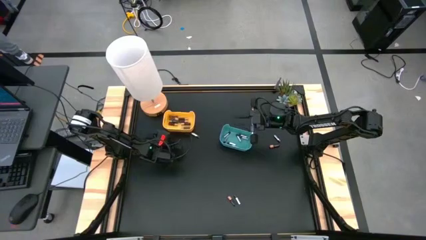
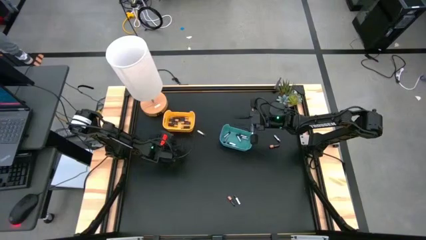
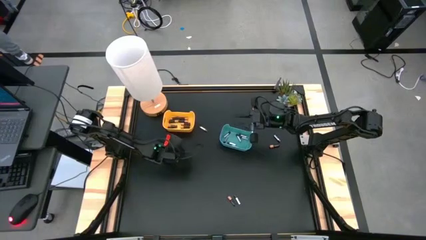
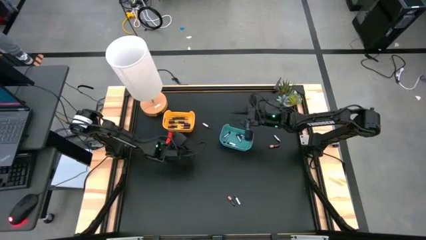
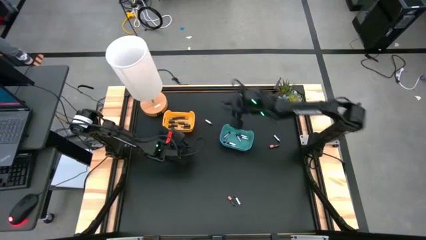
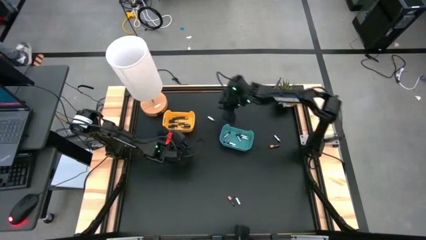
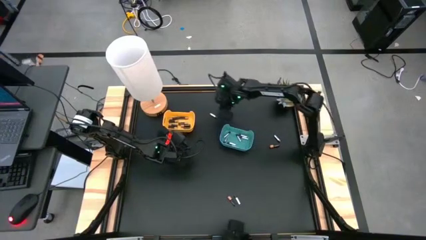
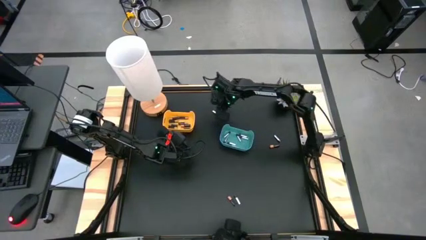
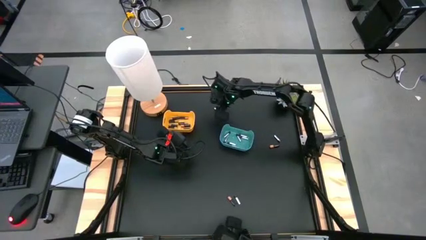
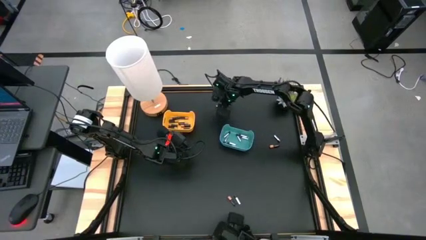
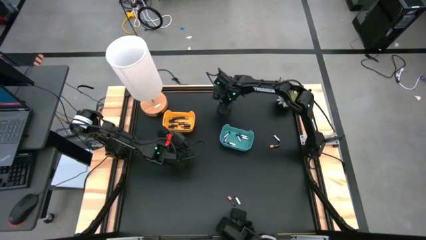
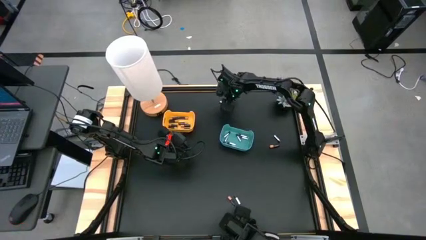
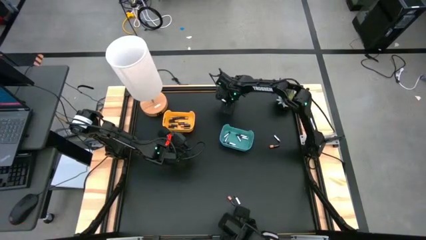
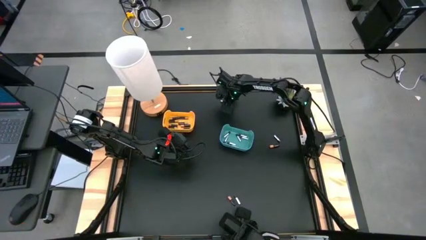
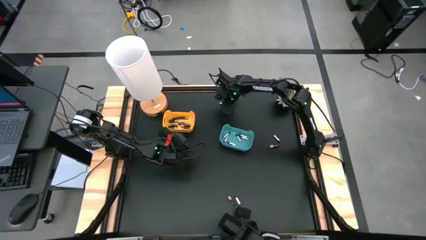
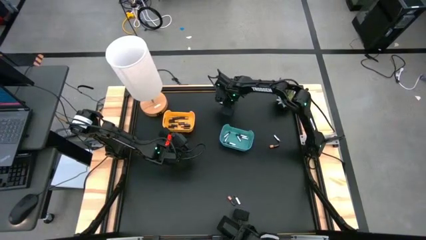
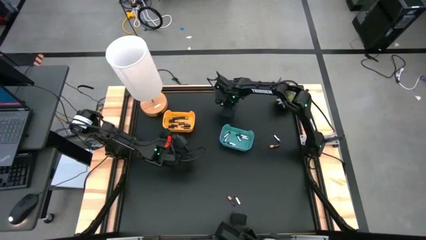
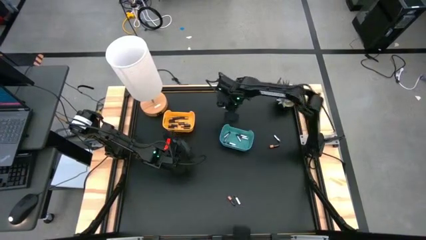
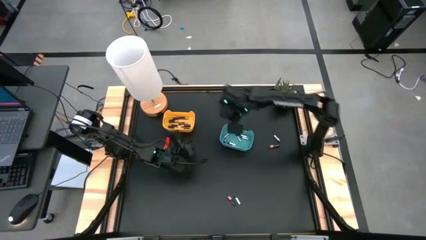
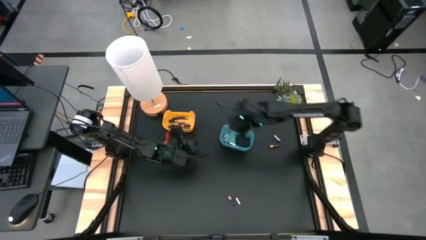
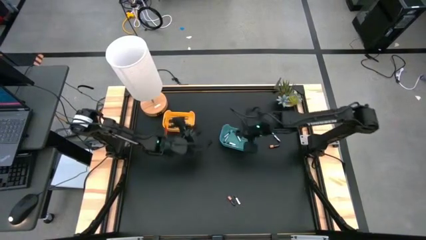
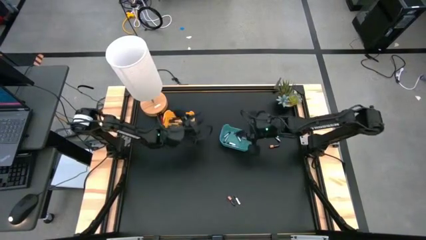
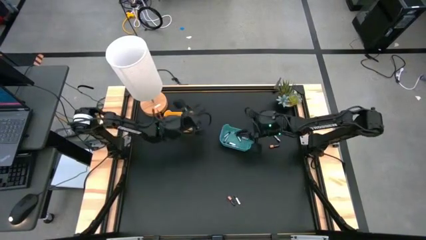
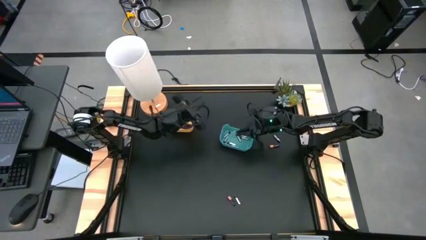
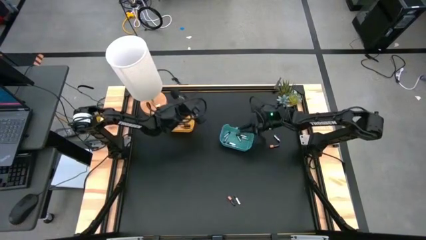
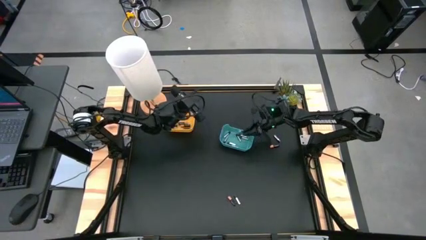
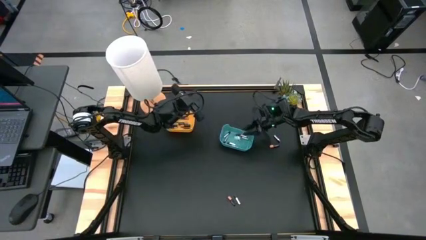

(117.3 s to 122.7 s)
Task: Sort batteries
Put the top left silver battery into the blue bin

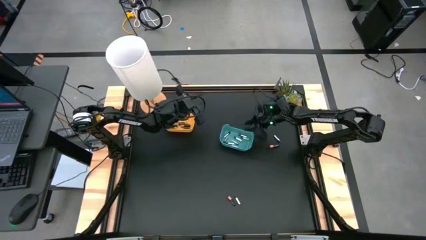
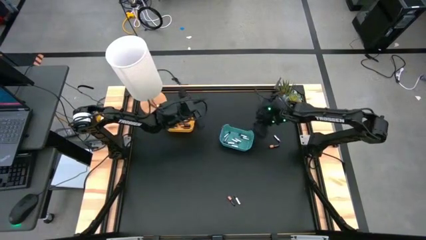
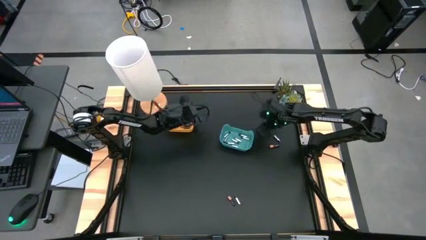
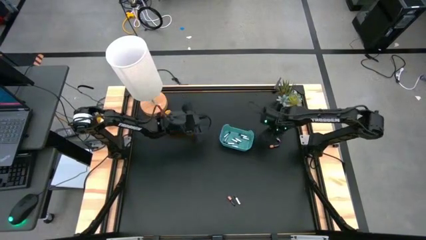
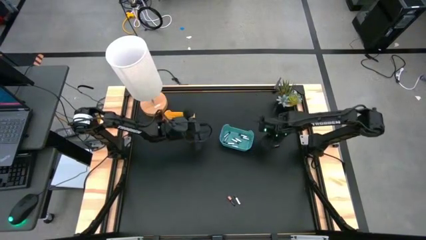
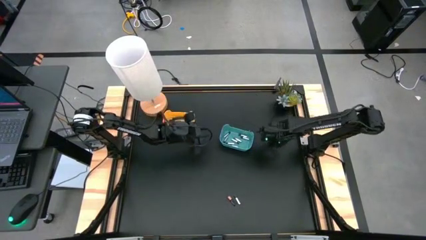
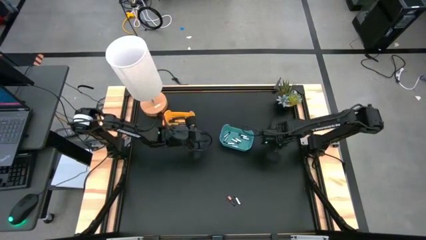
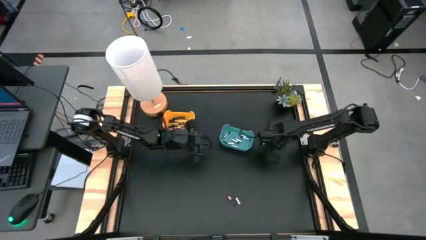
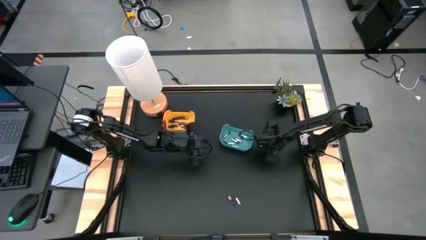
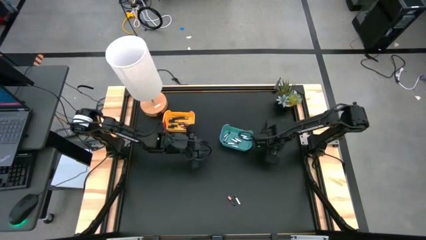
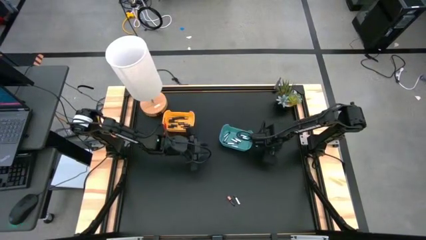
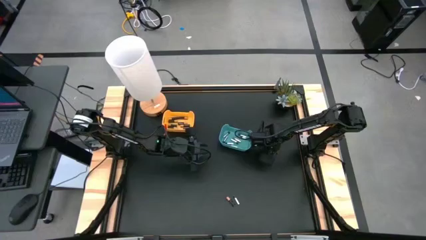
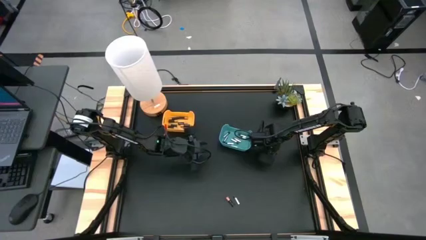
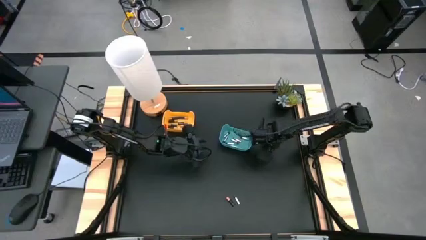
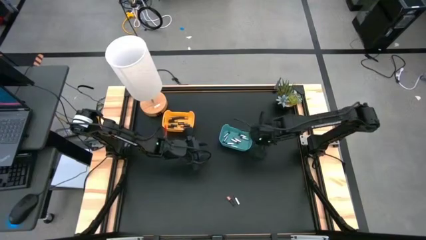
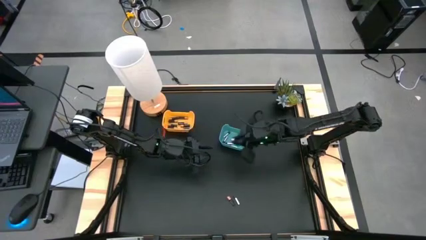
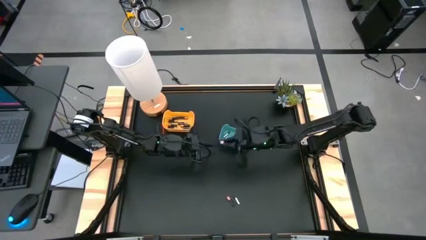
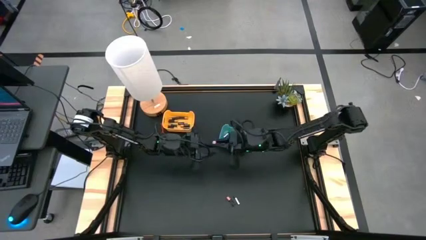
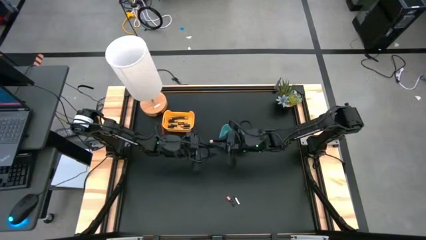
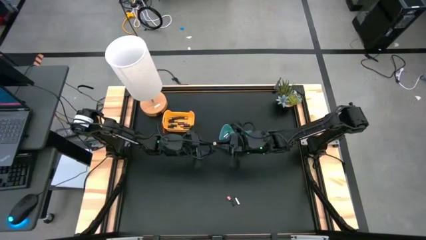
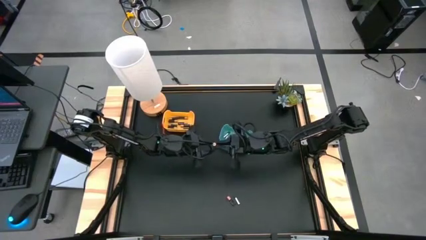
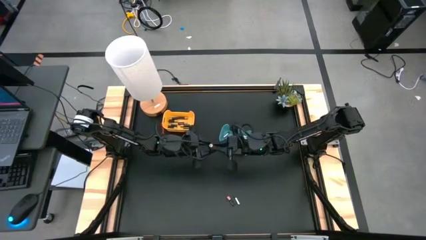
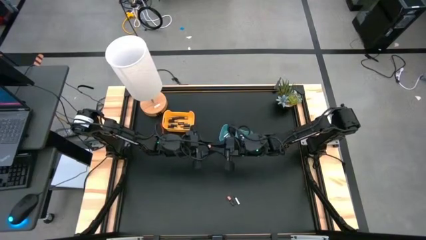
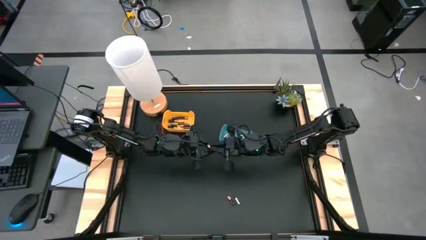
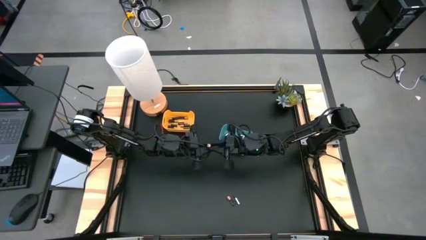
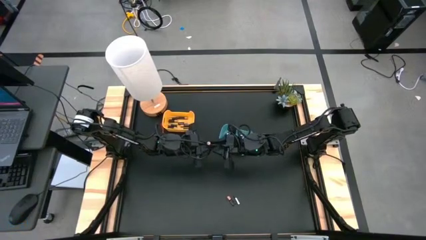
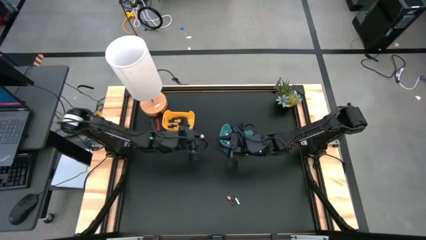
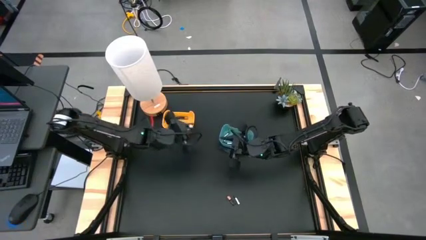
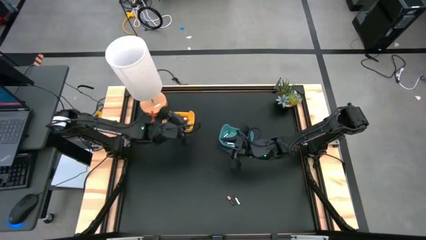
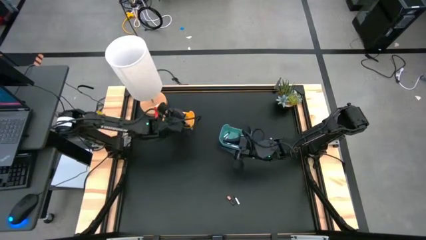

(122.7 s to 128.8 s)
Put the top black battery into the yellow bin

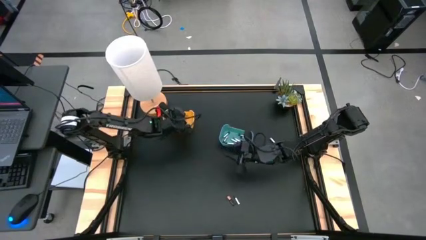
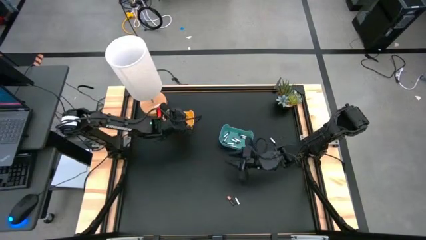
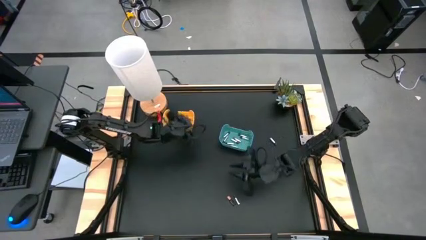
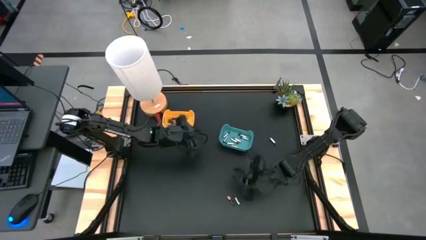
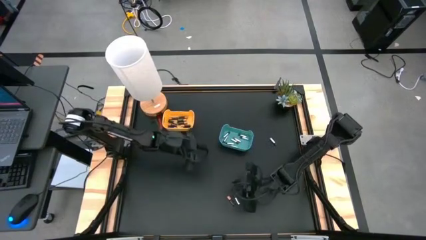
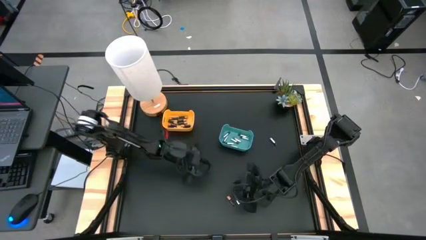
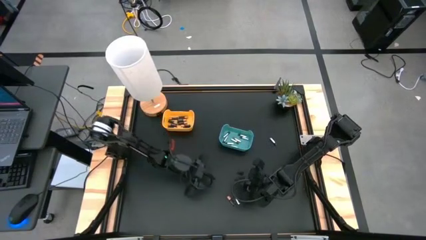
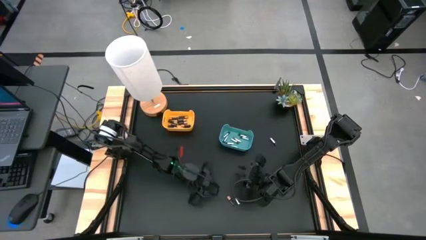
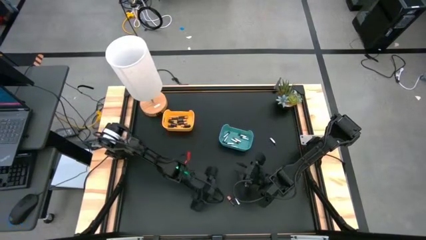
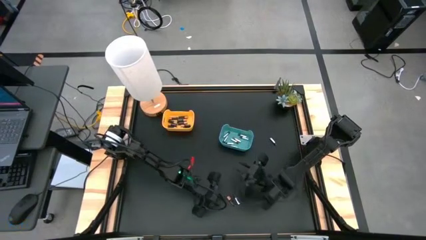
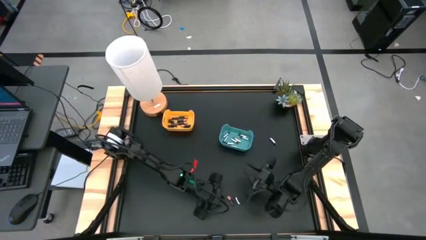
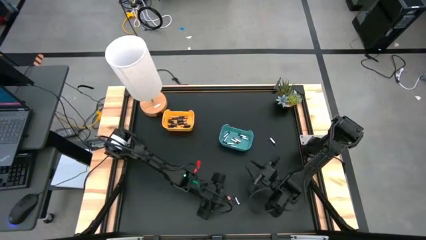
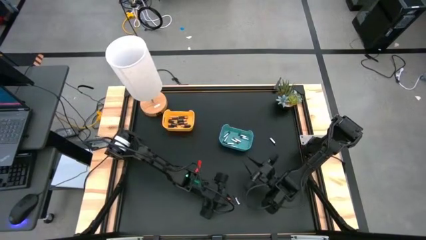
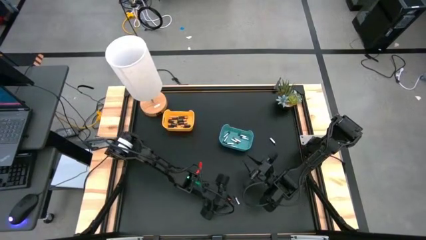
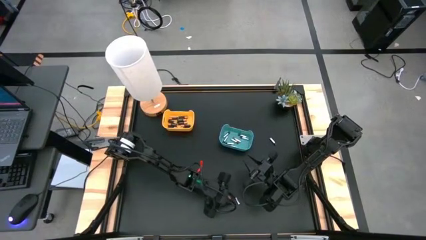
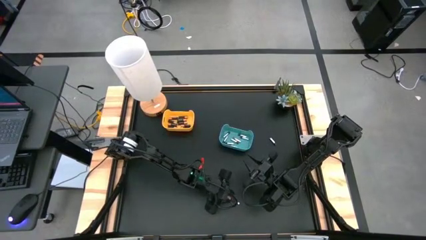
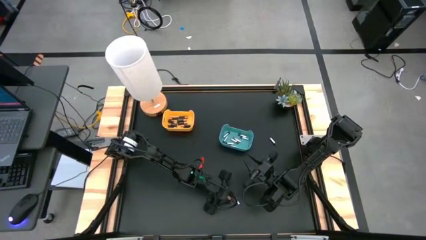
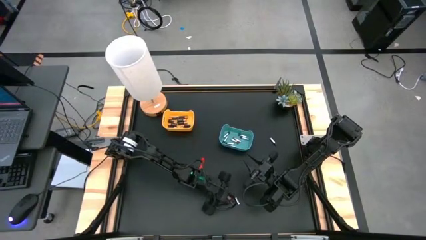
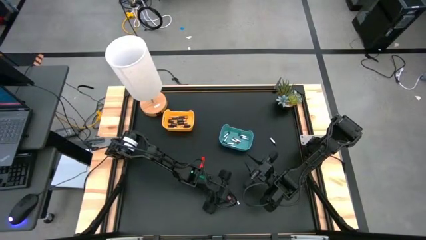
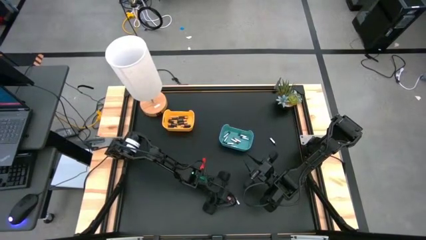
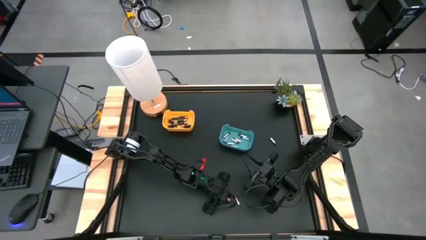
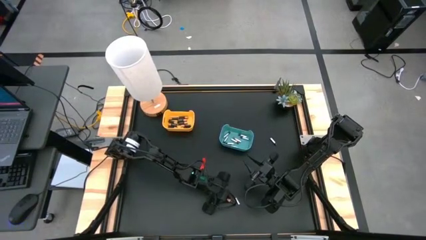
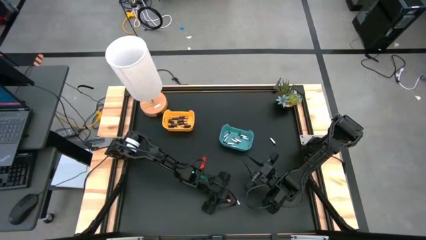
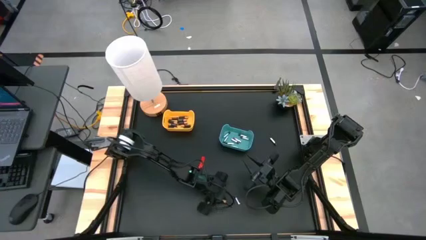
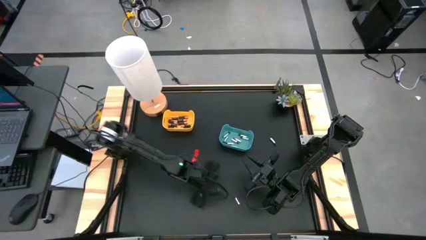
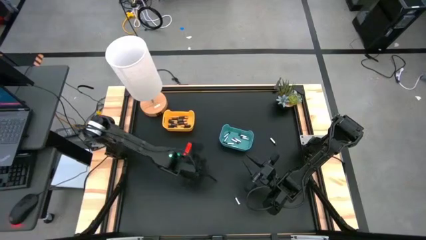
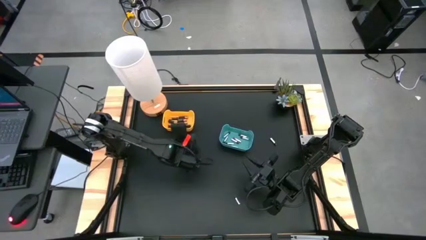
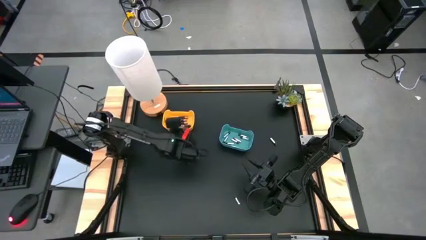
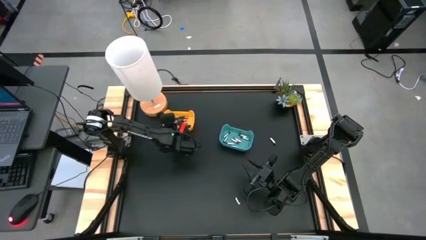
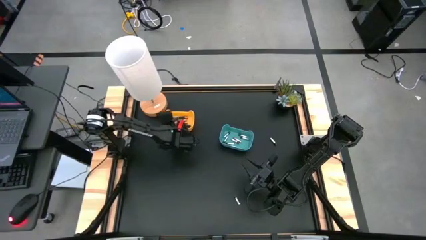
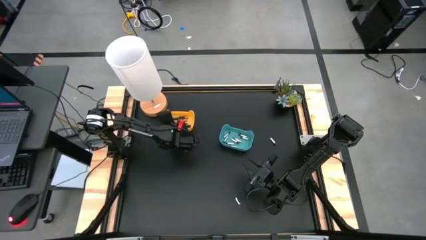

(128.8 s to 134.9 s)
Put the black battery into the yellow bin
